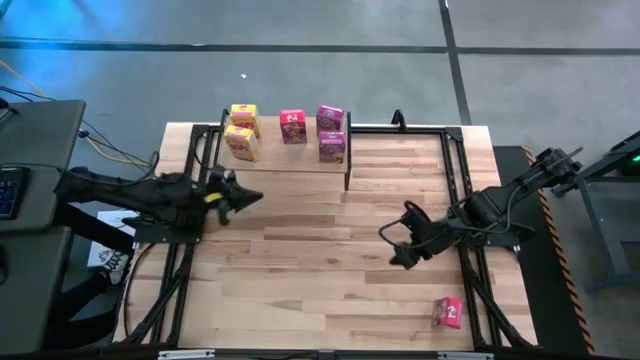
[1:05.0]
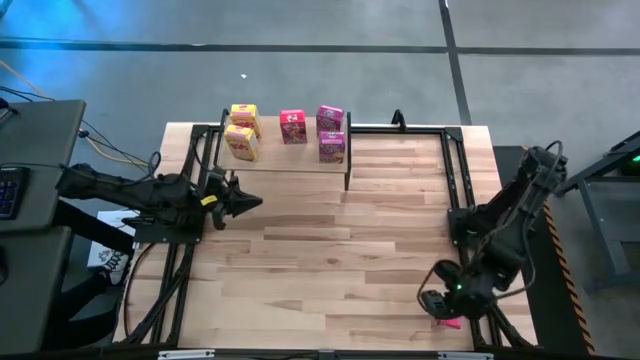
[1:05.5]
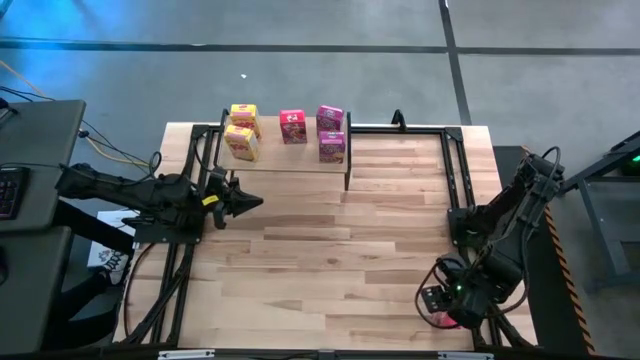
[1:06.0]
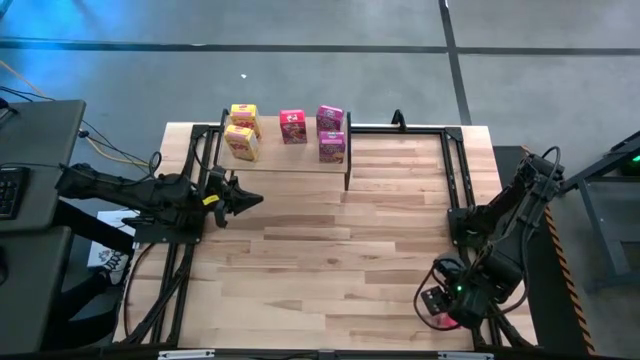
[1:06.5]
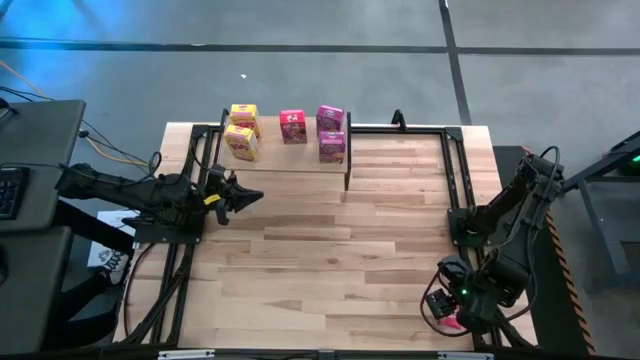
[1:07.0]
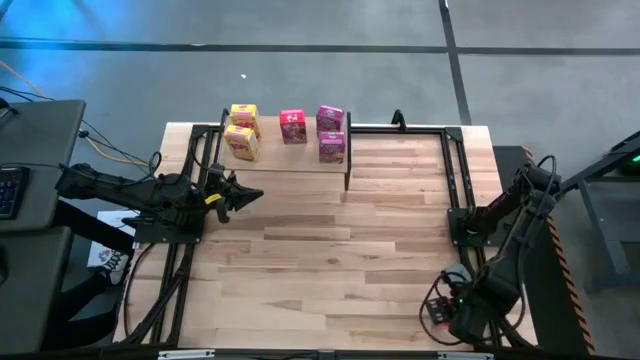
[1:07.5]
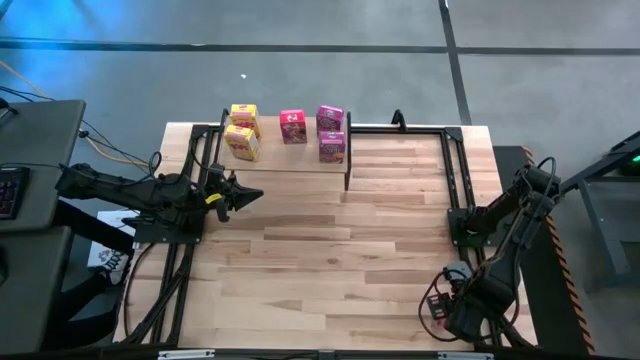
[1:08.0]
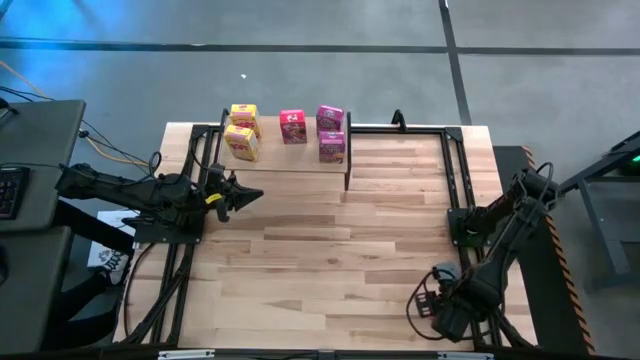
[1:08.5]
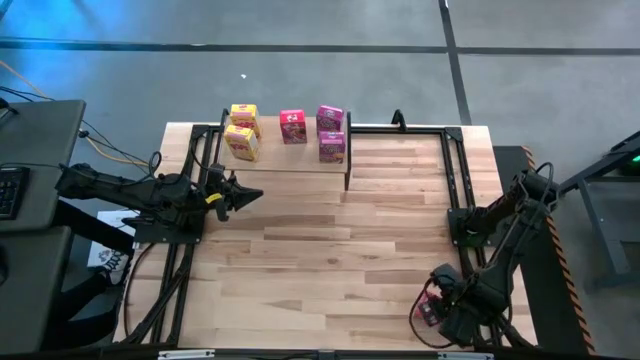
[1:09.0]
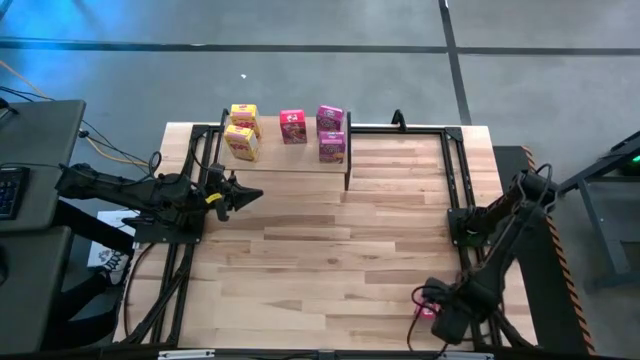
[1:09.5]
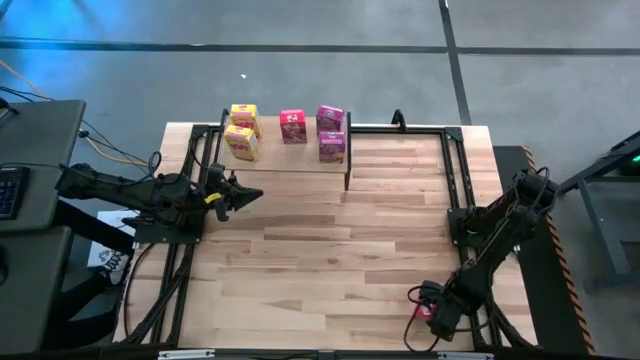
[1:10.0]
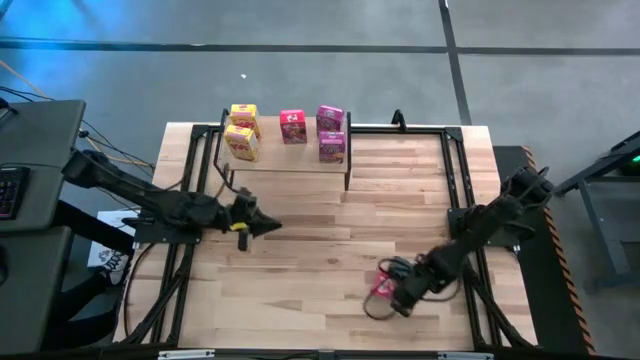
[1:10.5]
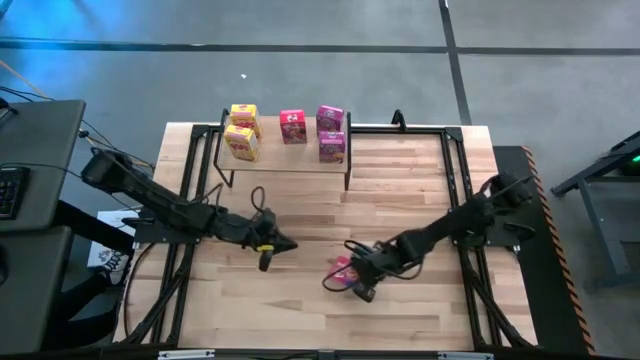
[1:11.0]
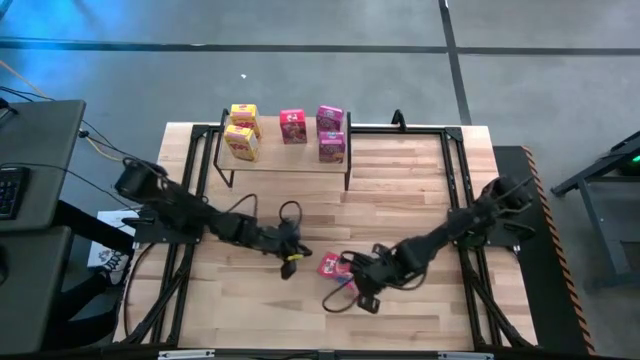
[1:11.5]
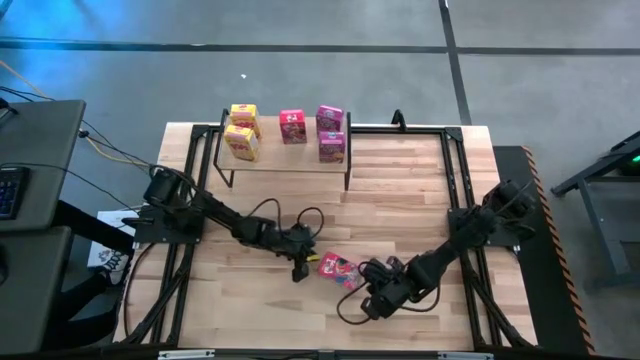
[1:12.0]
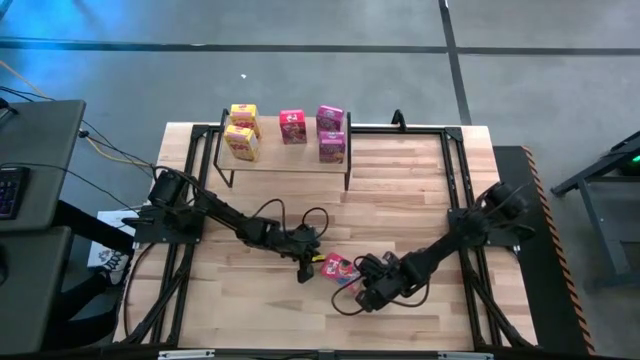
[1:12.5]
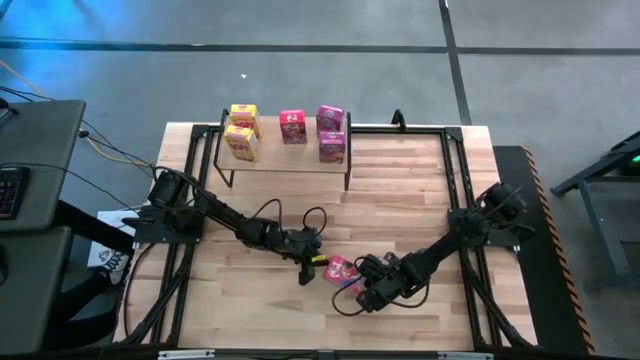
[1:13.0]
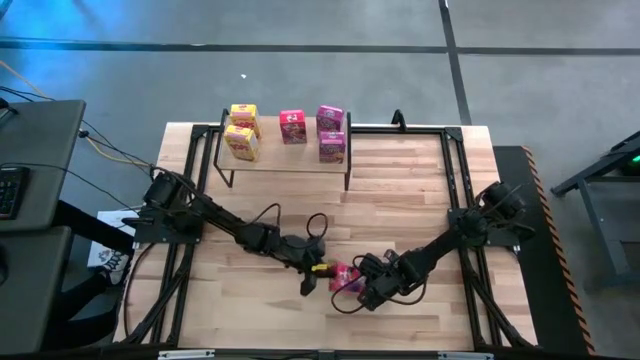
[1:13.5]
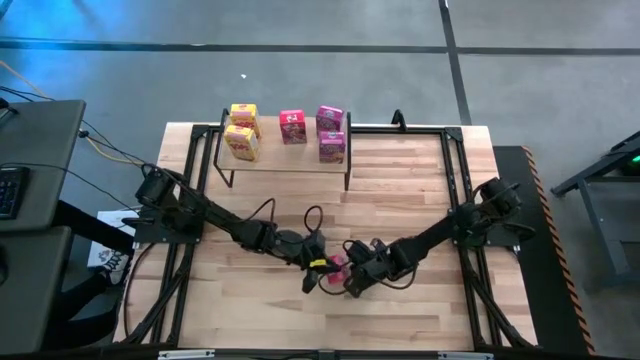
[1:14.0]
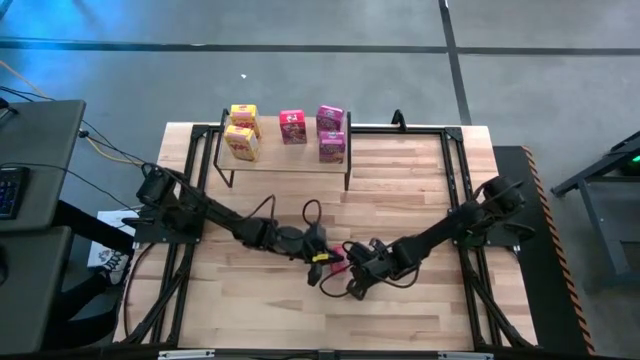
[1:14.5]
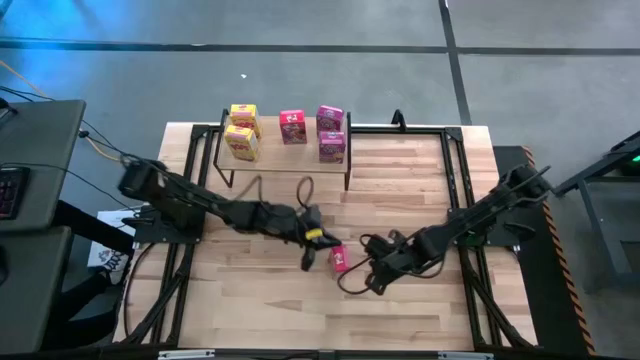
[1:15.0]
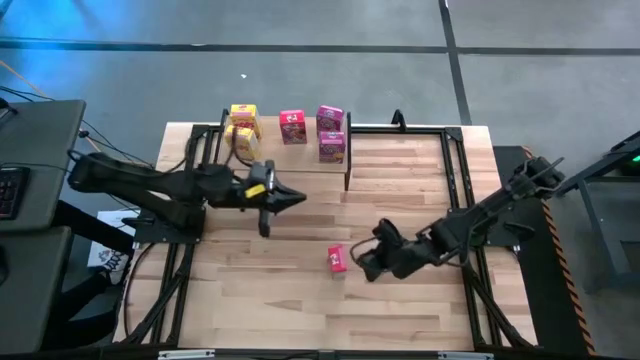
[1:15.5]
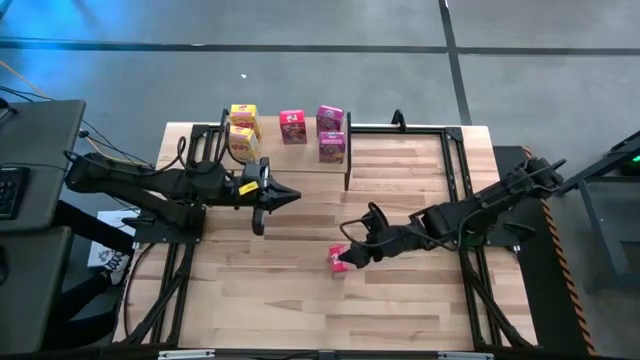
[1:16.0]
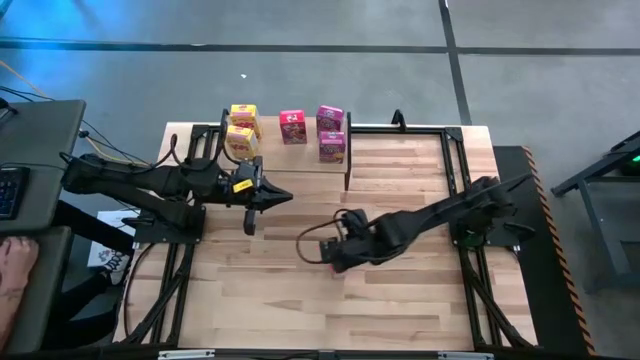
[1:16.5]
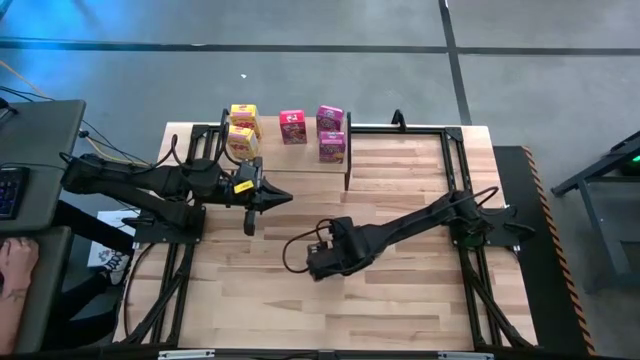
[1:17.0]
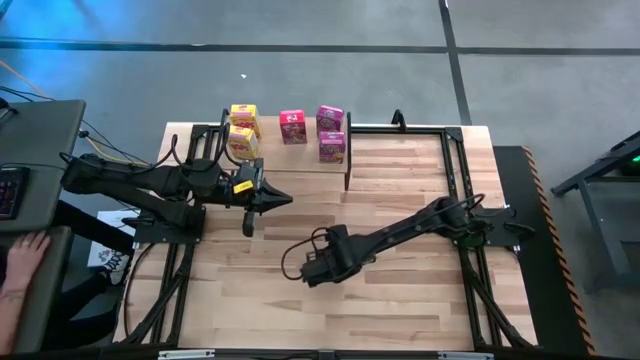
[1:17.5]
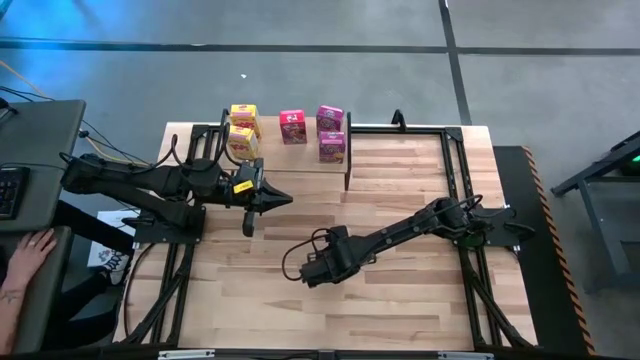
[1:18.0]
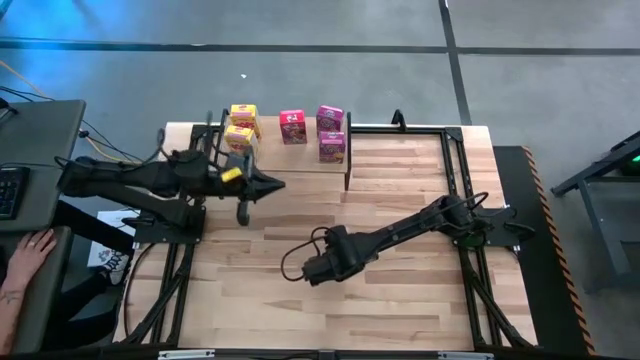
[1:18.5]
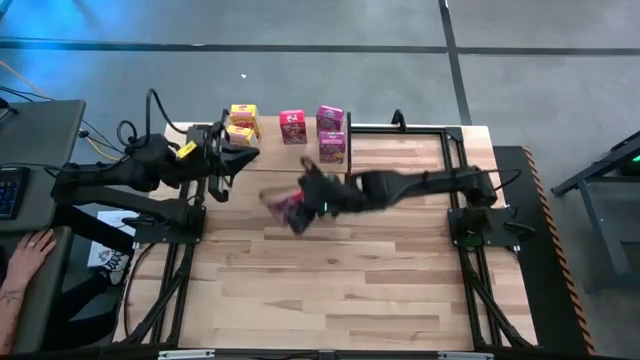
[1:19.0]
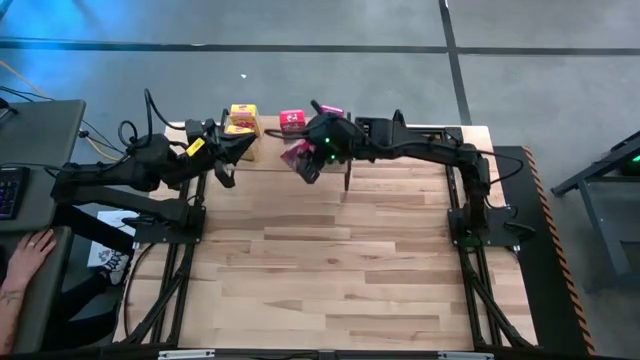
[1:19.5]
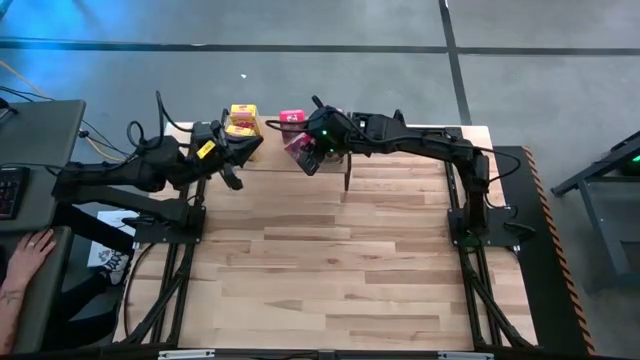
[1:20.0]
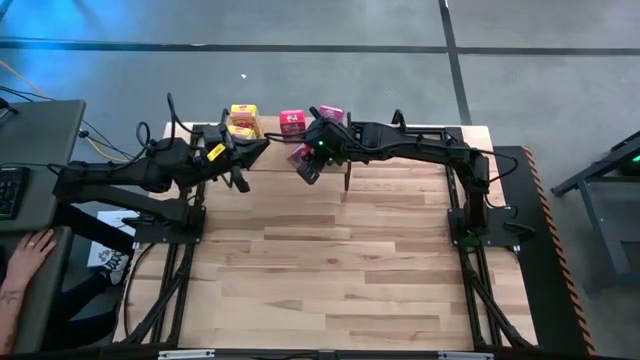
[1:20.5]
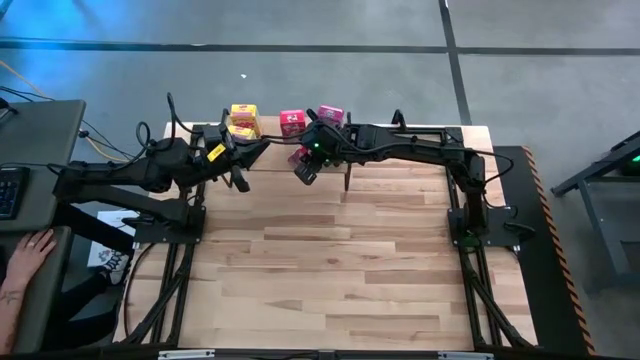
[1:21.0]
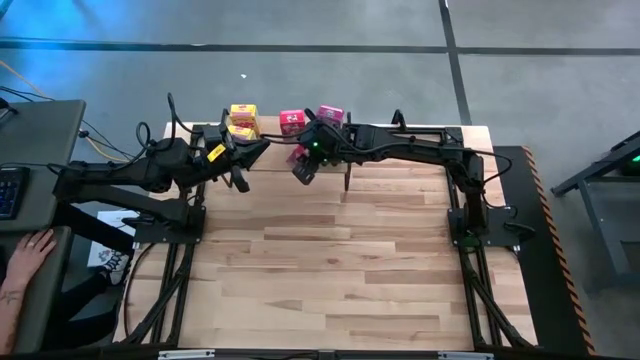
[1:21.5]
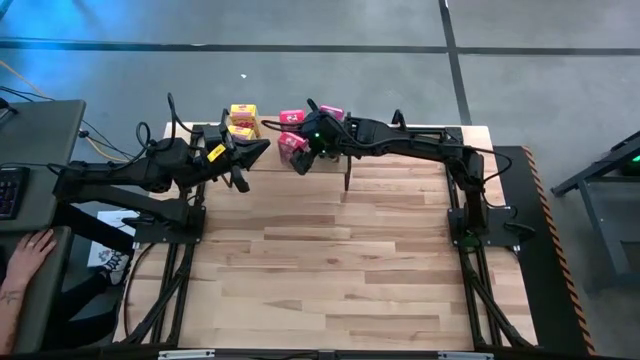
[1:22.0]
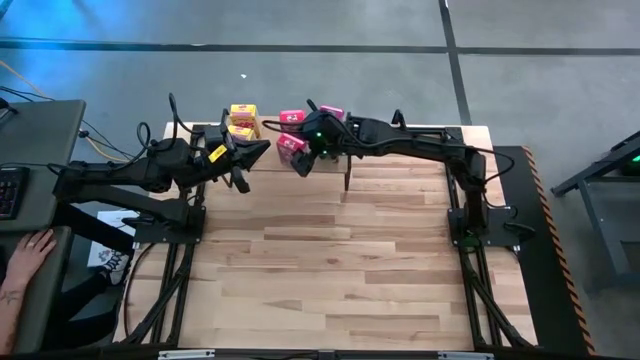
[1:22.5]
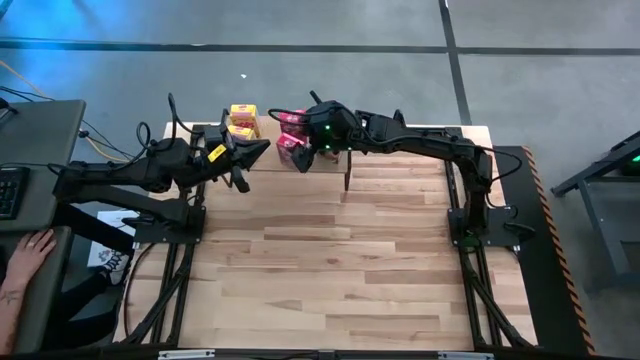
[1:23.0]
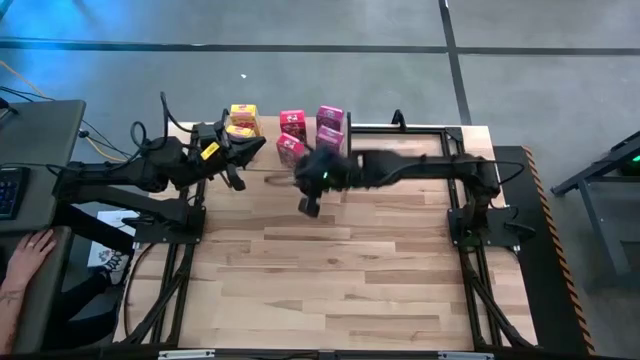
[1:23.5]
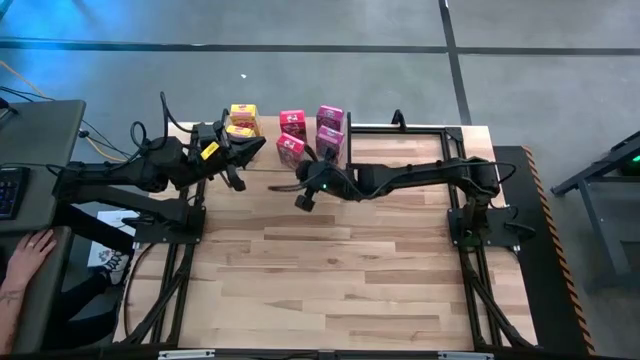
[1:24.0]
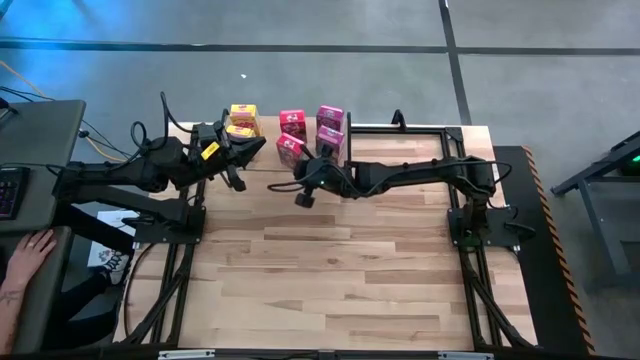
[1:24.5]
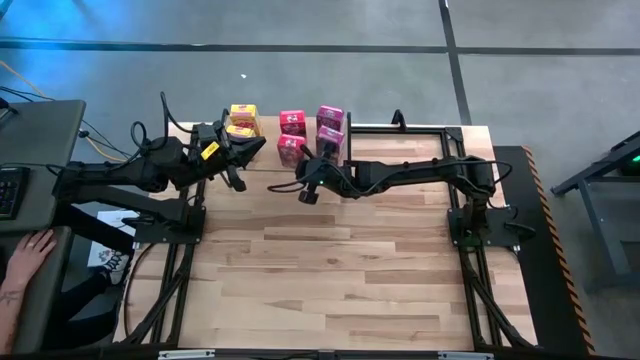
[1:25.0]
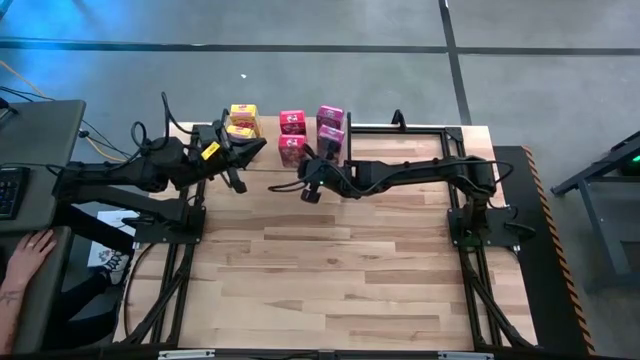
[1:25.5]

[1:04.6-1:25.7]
Task: Stack cereal on shelf
Put the red cereal box on the shelf aligned with the other red cereal box

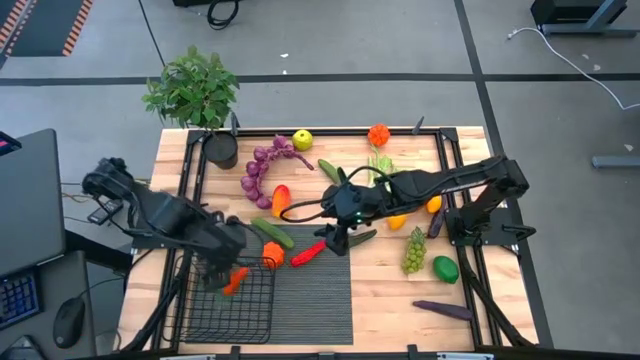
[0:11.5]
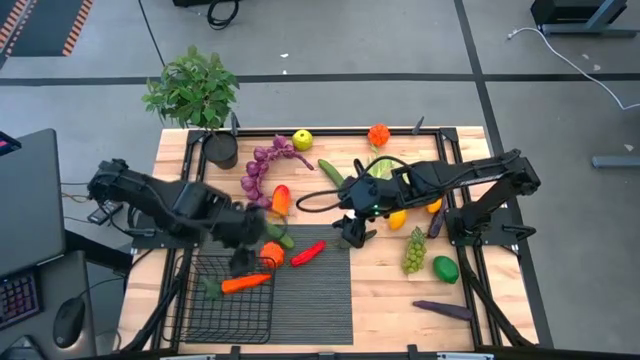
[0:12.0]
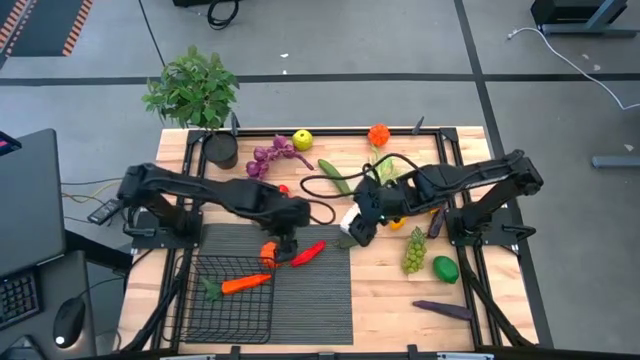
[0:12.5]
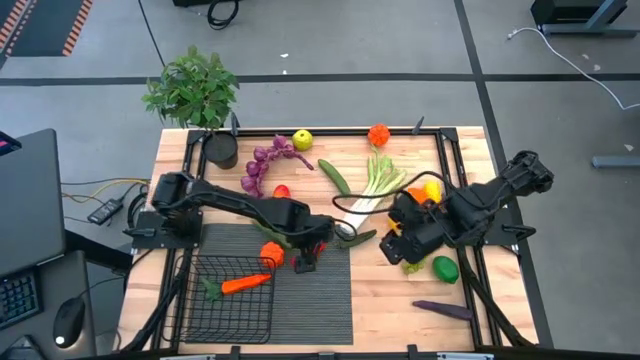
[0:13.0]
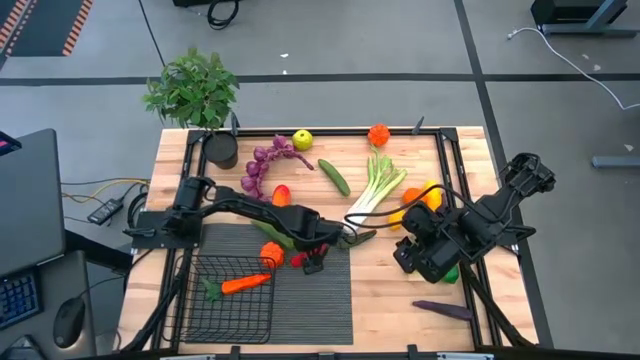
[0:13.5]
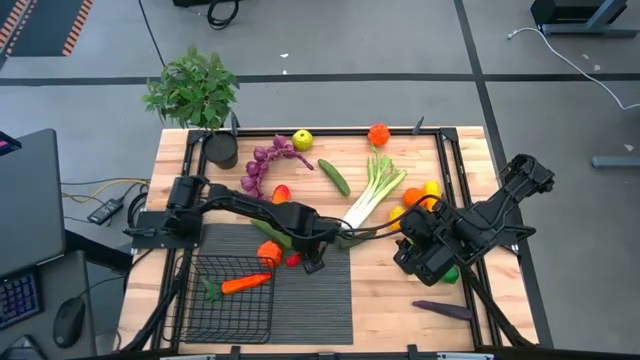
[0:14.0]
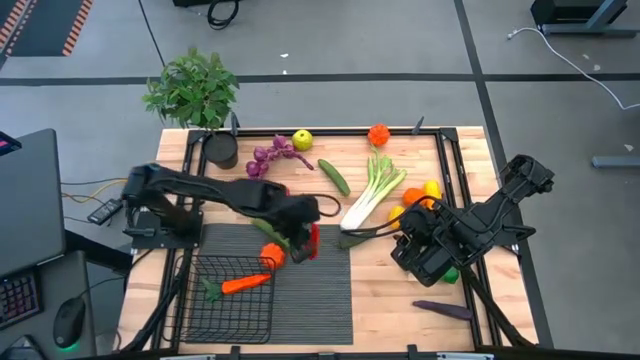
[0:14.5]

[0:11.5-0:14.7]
Task: Build produce basket
Put the red chili pepper into the wire basket
